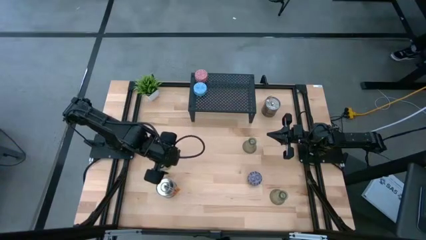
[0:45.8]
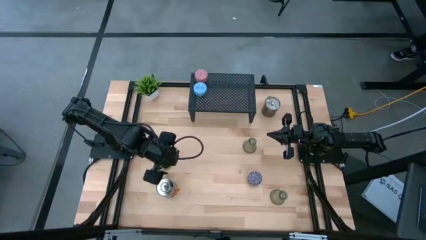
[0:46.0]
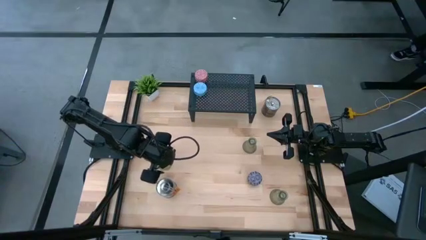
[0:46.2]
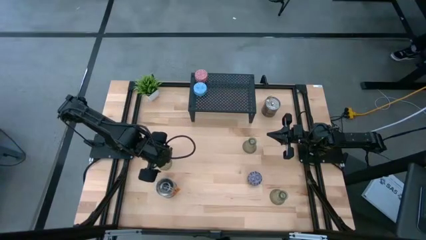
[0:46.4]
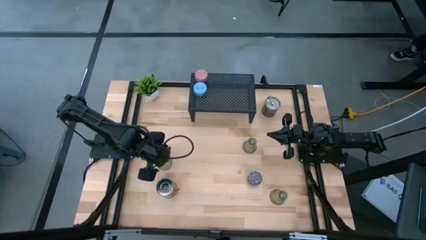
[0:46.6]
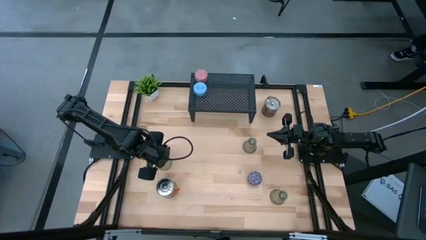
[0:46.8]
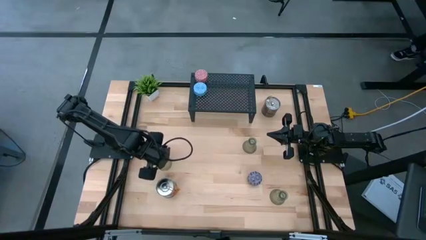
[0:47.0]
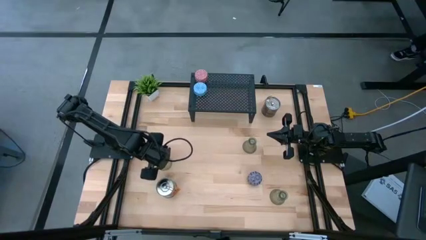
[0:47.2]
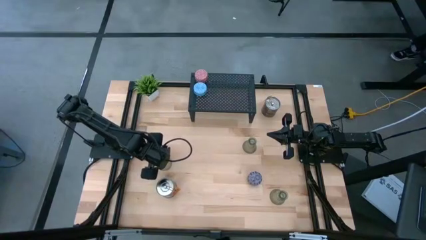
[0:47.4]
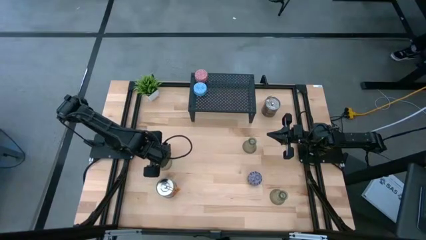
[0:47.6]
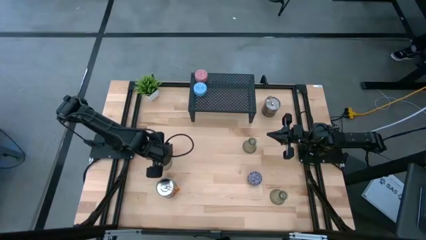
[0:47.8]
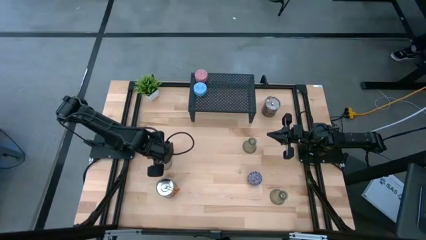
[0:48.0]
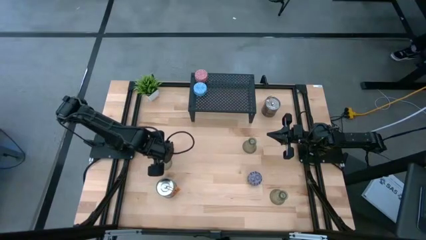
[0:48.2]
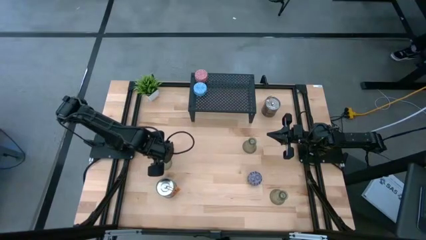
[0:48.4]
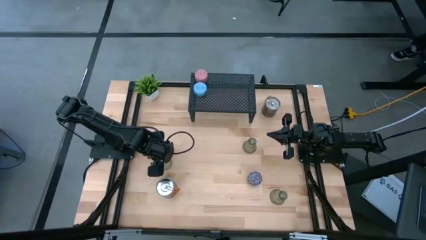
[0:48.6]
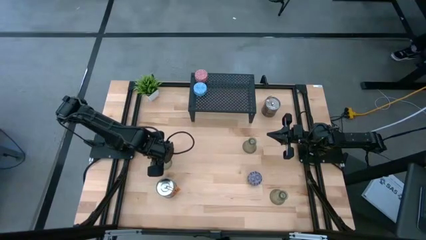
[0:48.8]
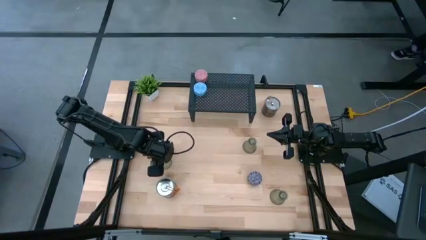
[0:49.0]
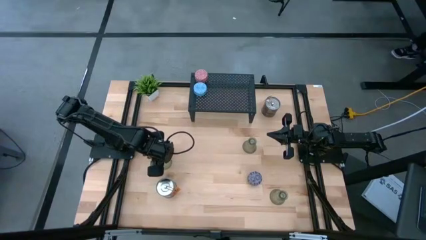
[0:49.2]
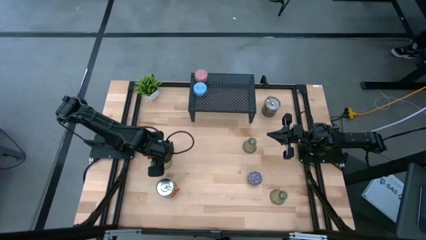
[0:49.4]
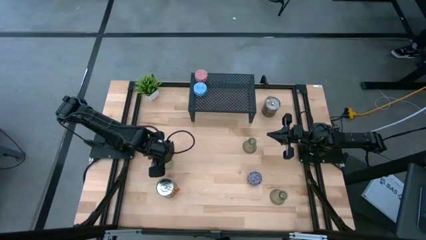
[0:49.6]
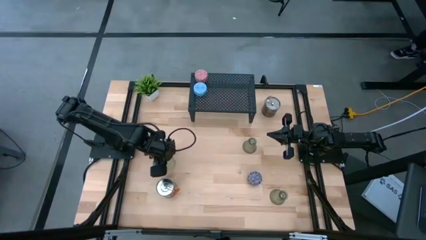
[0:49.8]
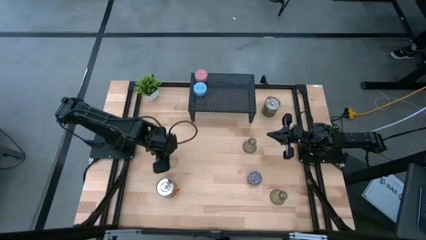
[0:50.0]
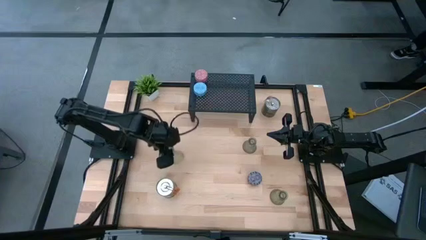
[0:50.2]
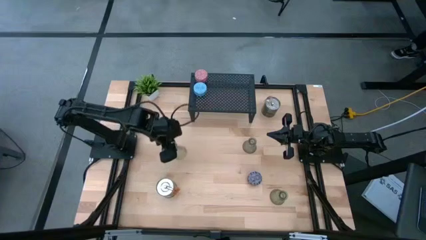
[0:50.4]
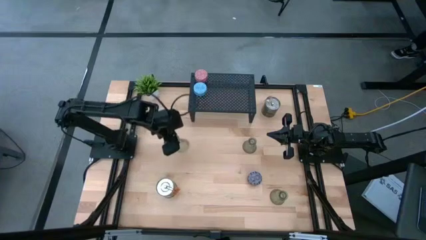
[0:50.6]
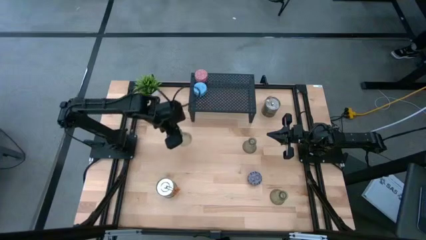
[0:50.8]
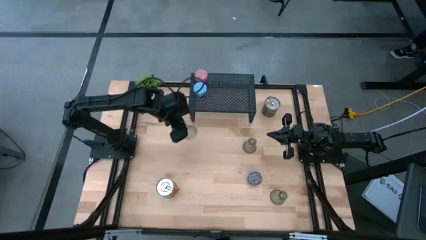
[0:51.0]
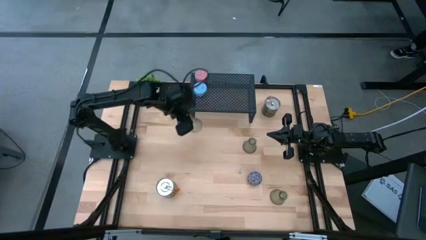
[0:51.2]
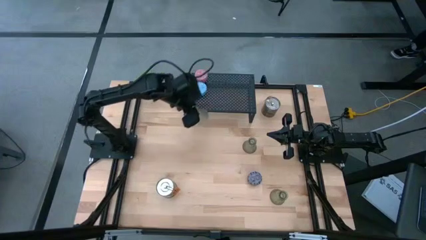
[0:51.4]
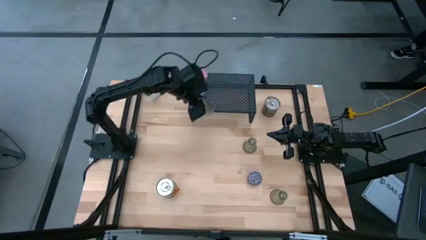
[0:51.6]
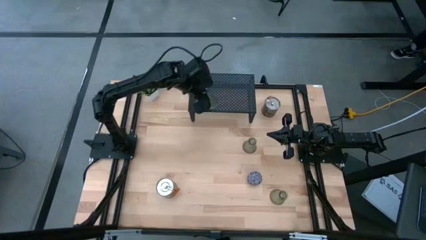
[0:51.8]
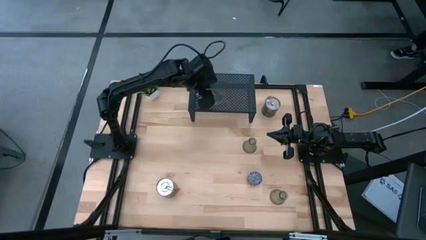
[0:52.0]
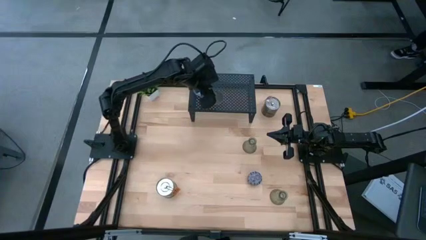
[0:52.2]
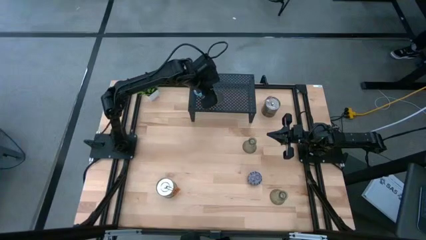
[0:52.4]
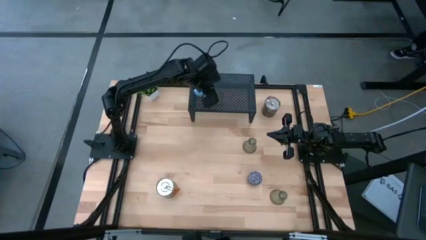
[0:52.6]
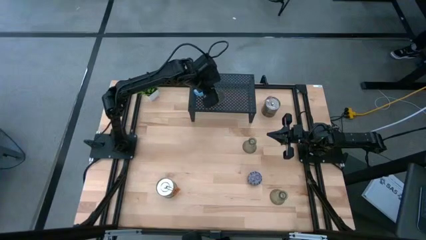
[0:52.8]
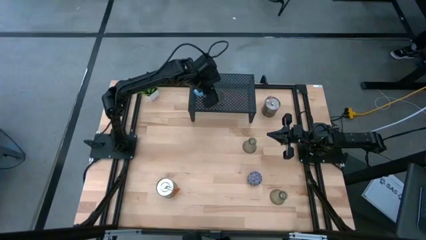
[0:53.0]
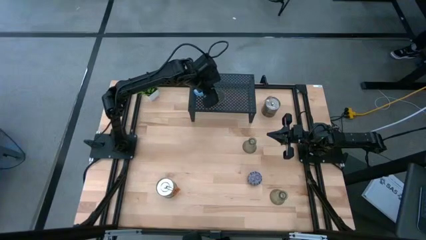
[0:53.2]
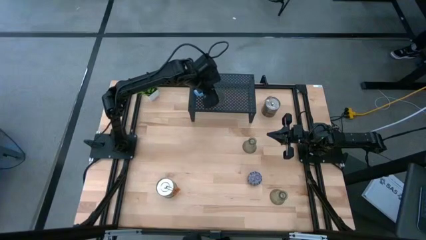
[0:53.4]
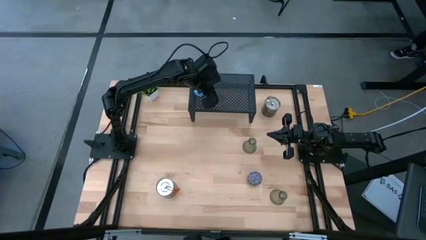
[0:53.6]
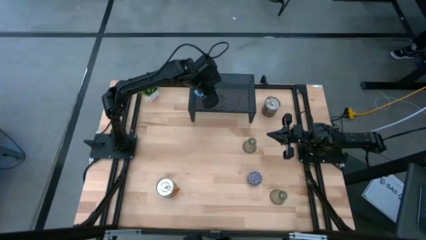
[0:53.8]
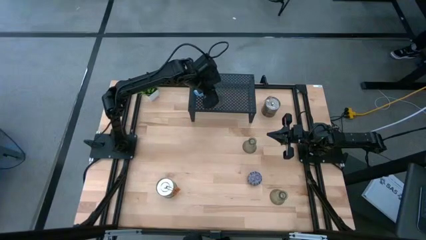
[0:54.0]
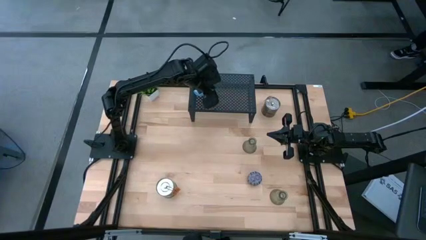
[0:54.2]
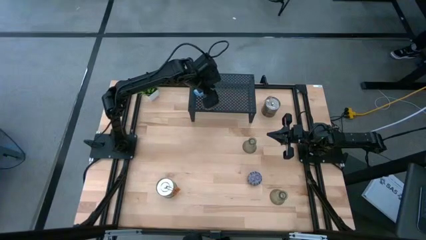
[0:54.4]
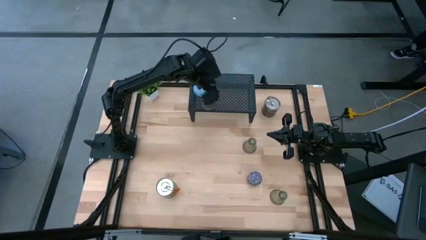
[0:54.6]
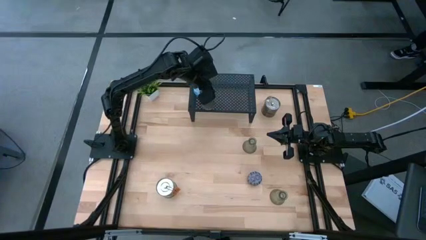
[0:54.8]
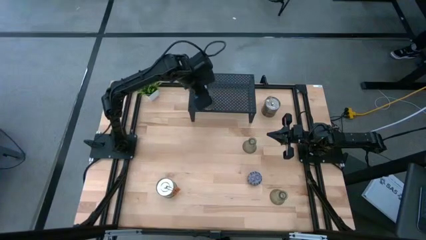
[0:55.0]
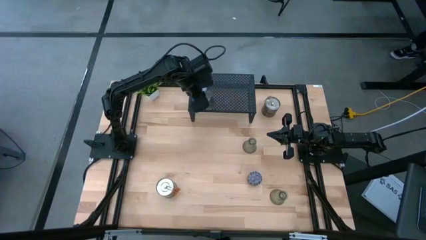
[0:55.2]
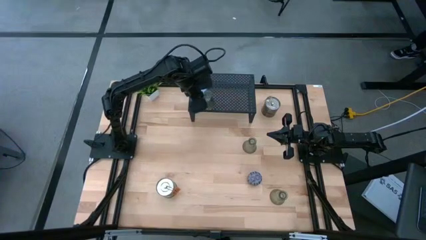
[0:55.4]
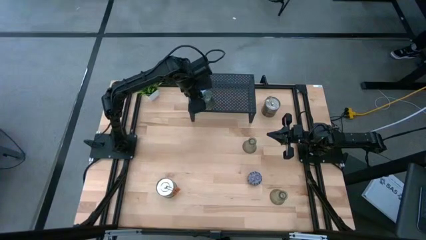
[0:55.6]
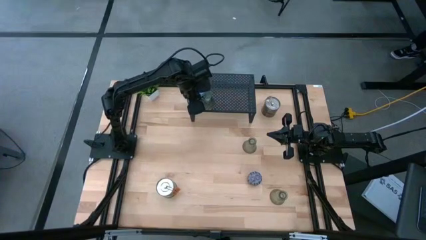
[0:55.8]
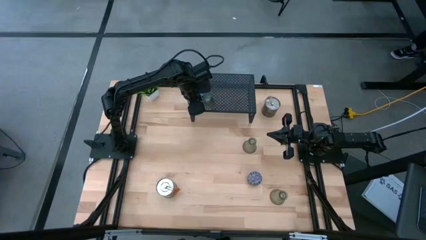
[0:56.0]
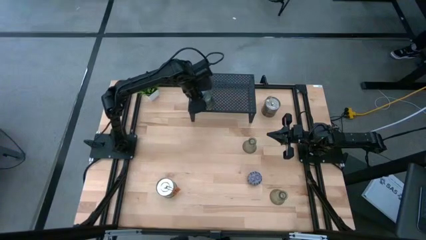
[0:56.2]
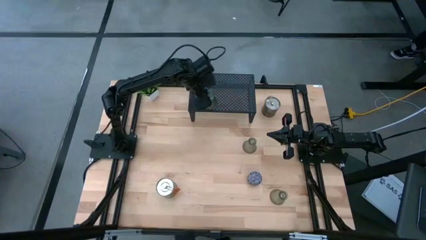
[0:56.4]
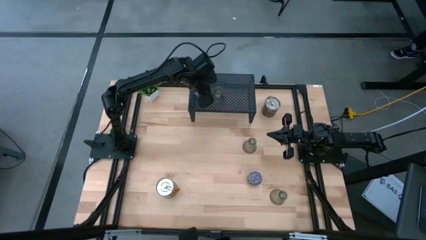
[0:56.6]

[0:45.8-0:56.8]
Task: Pick & Place candle stick holders
Put the top left green candle holder on the shelf
